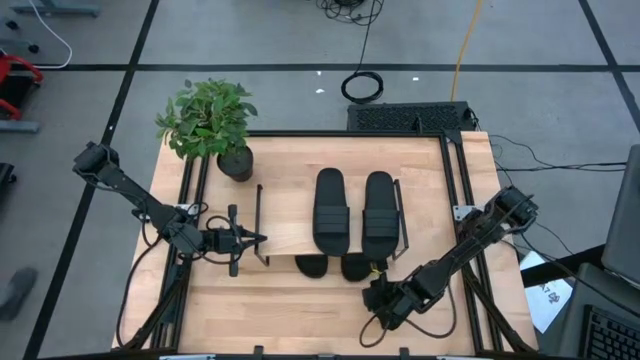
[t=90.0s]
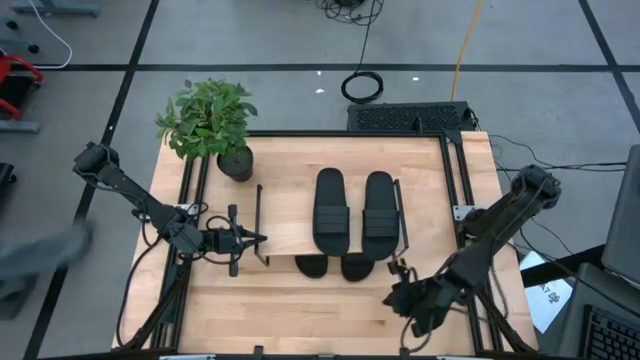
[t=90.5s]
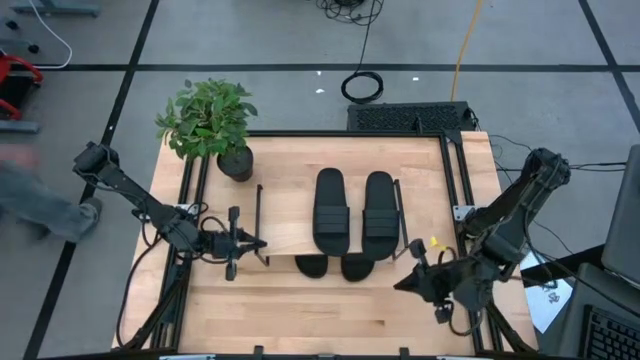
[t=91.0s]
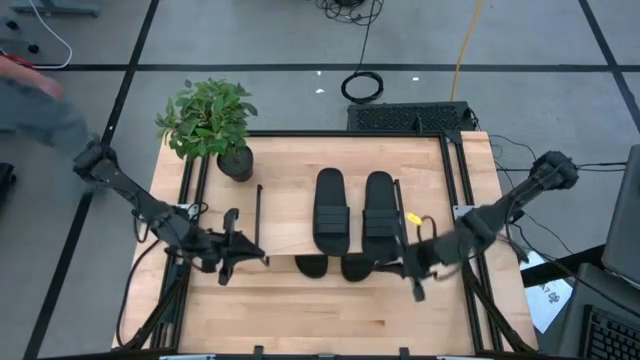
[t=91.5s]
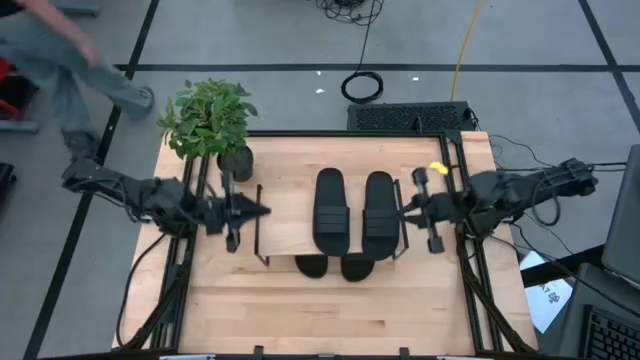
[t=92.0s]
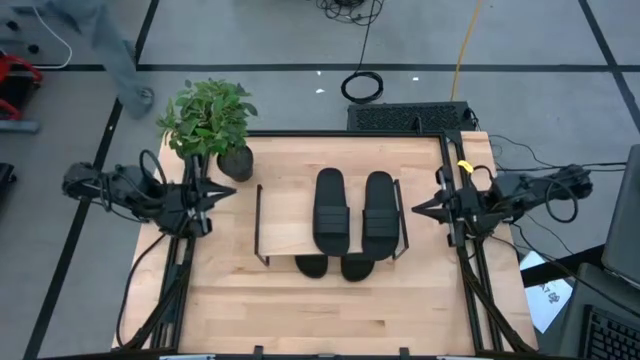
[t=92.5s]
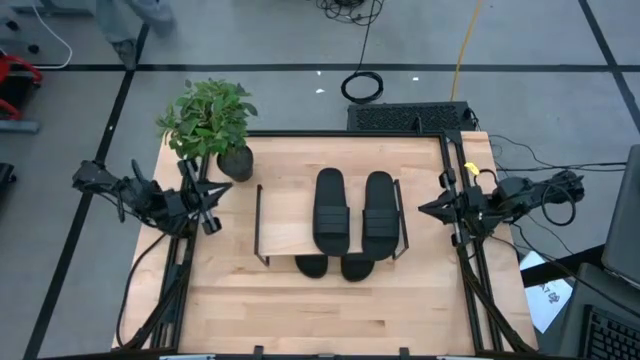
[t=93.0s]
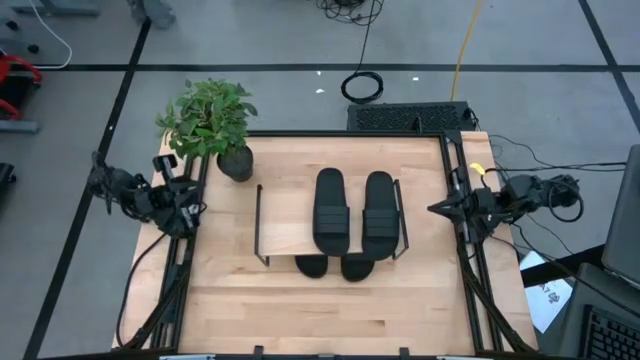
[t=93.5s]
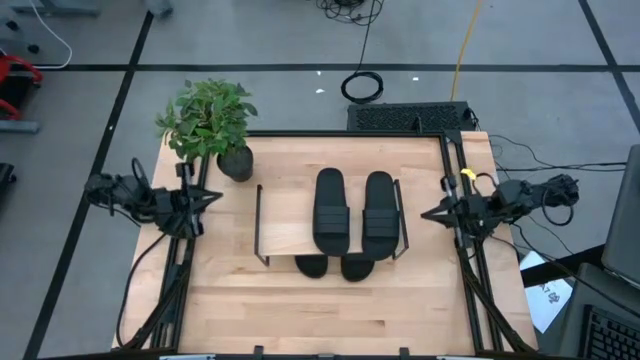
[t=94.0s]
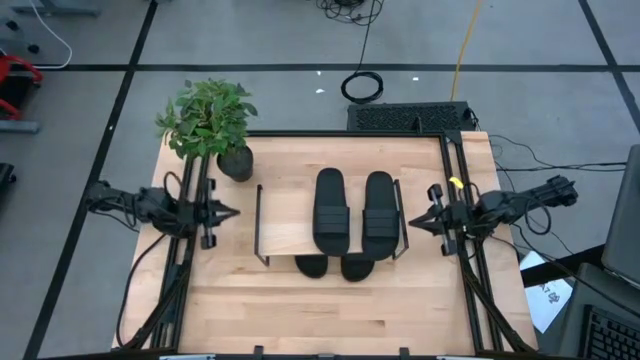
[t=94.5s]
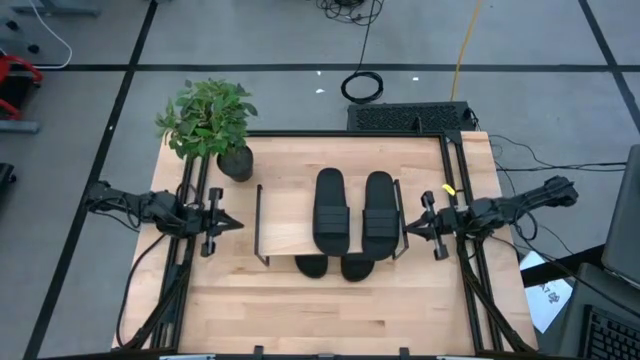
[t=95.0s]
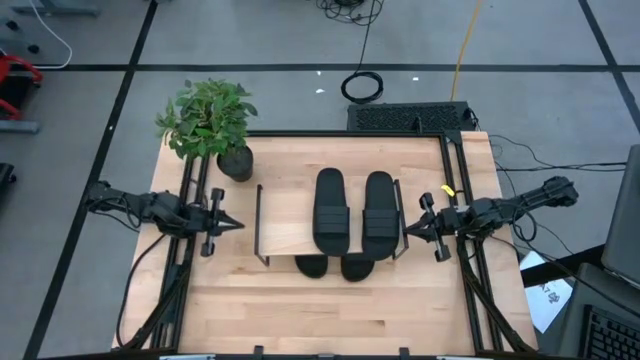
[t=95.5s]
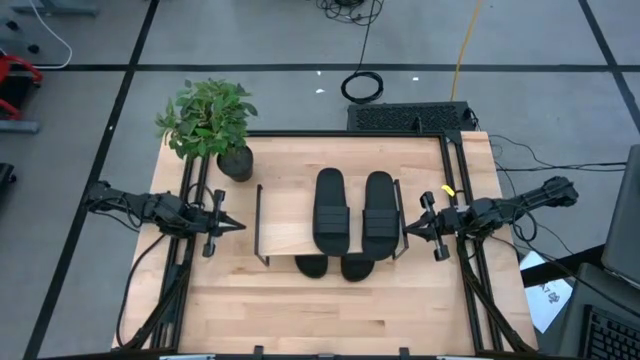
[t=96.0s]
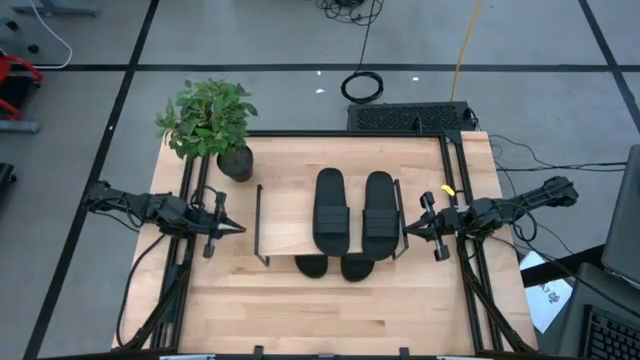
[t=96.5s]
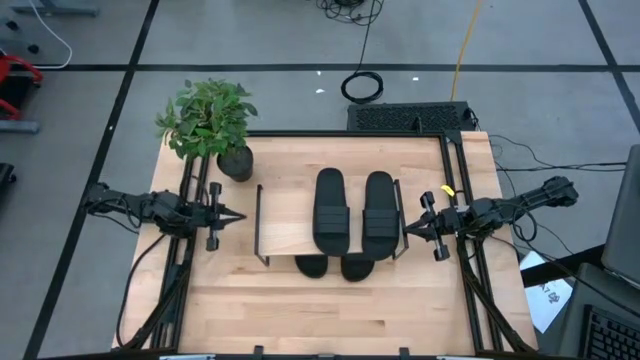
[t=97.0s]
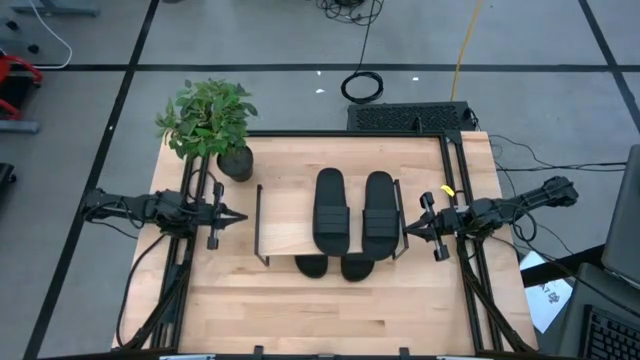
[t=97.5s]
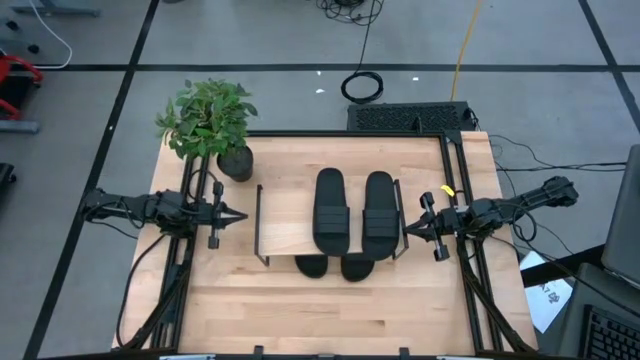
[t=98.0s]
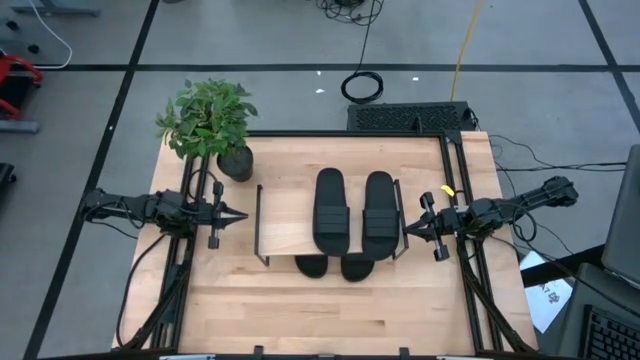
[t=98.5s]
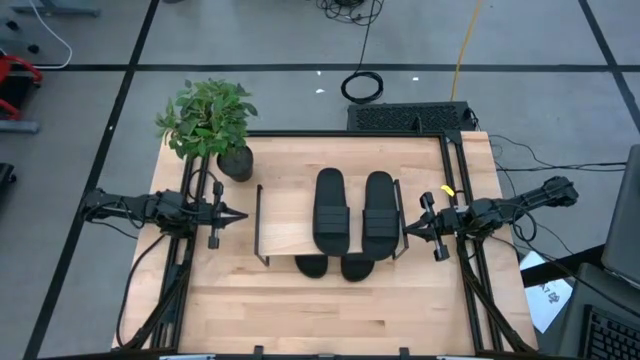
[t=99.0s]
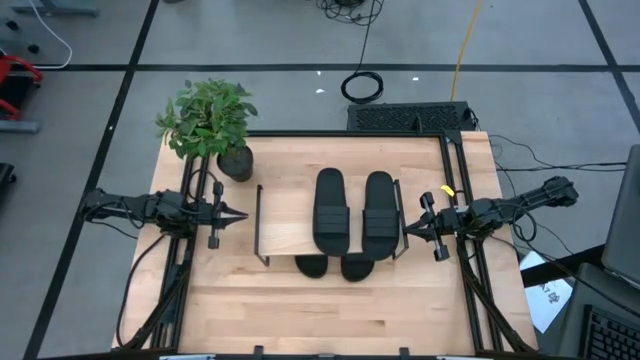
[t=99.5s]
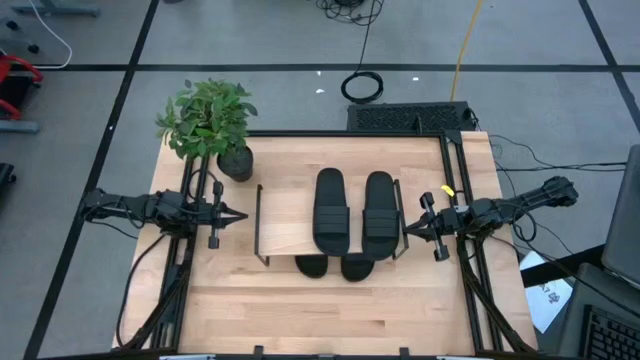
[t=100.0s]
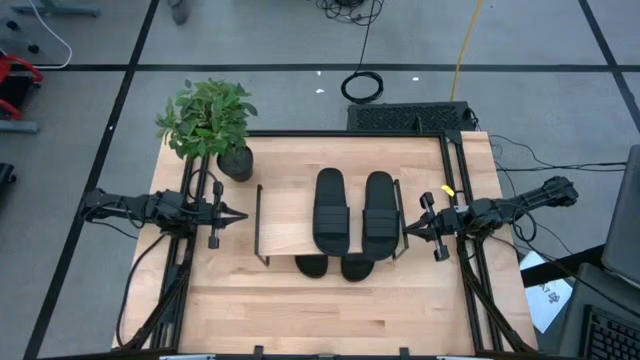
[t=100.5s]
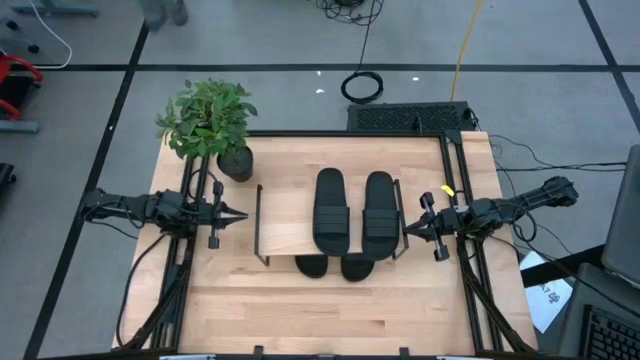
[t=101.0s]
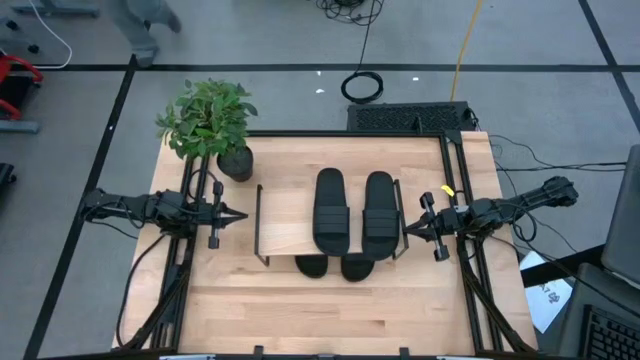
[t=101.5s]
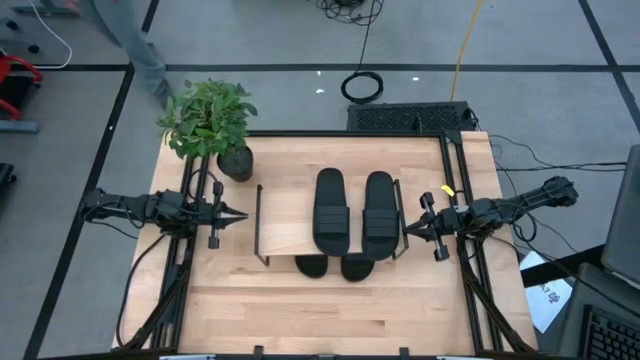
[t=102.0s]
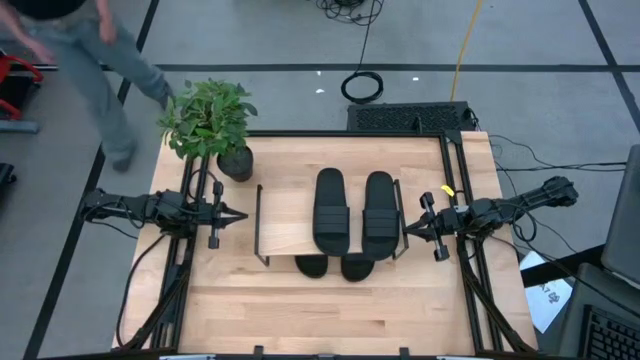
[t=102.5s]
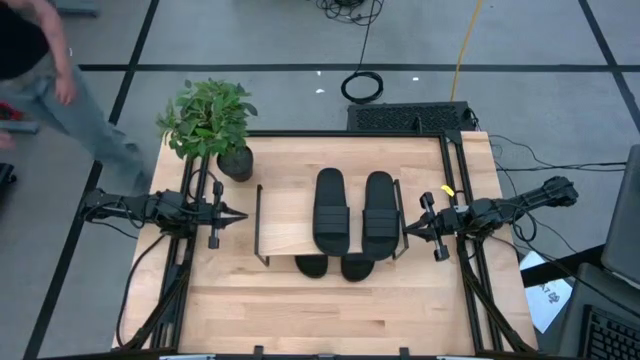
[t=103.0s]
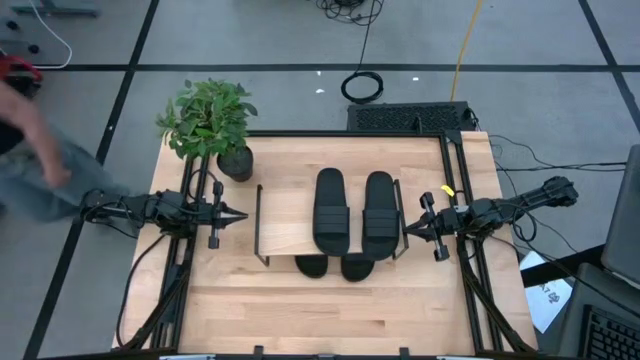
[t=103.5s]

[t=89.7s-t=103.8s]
Task: Pick and place slides into the shelf
Return to Home Position

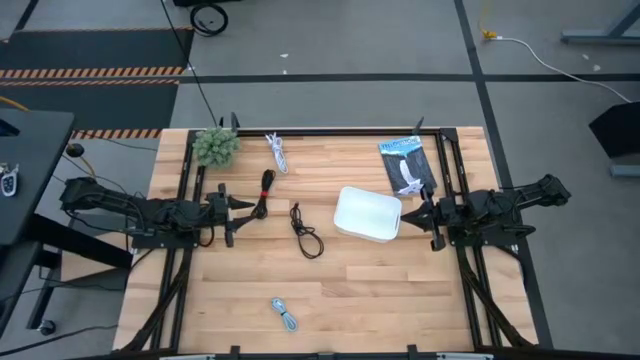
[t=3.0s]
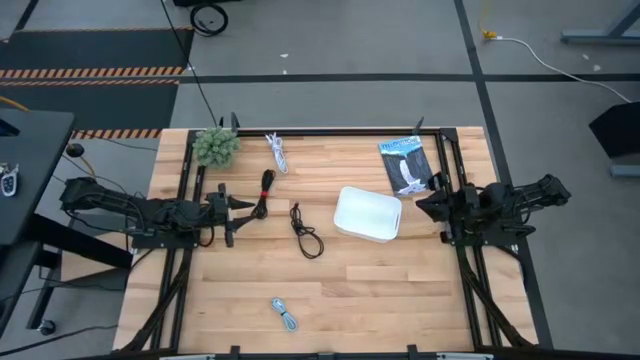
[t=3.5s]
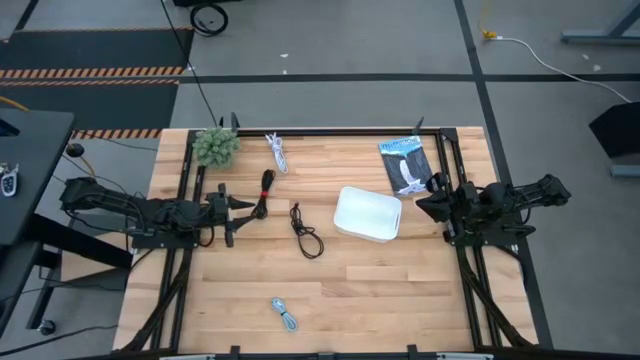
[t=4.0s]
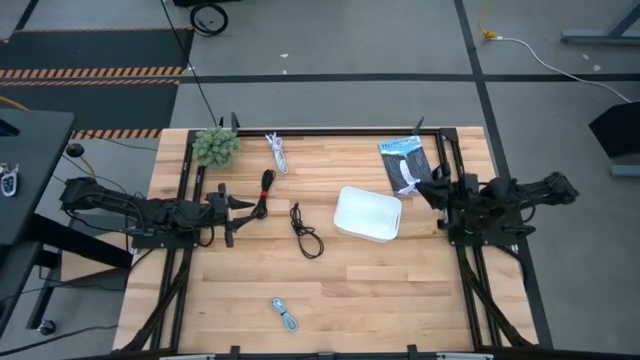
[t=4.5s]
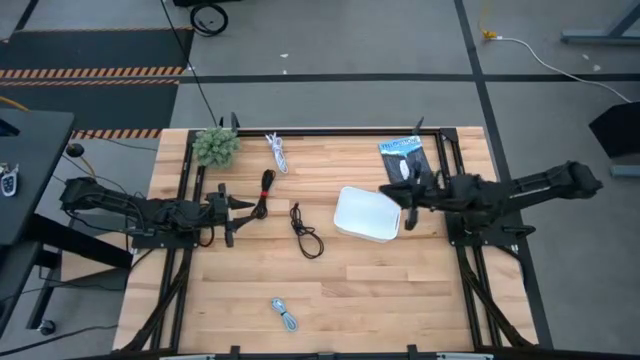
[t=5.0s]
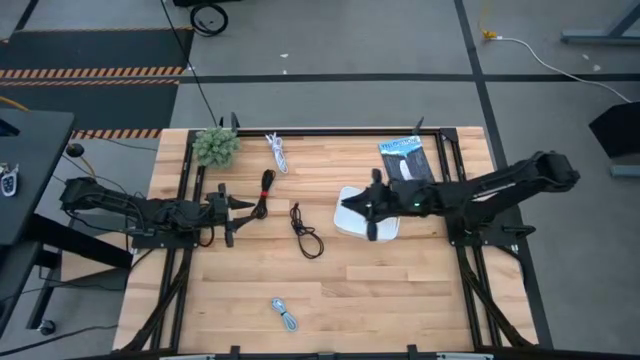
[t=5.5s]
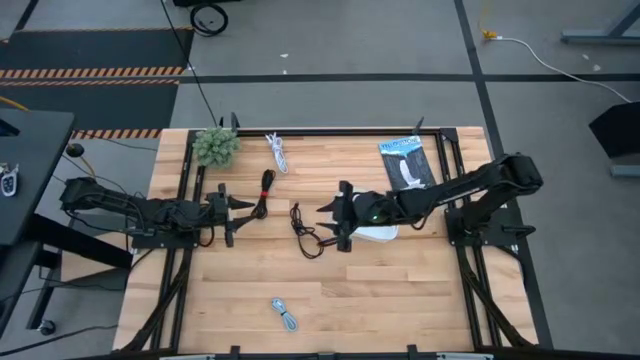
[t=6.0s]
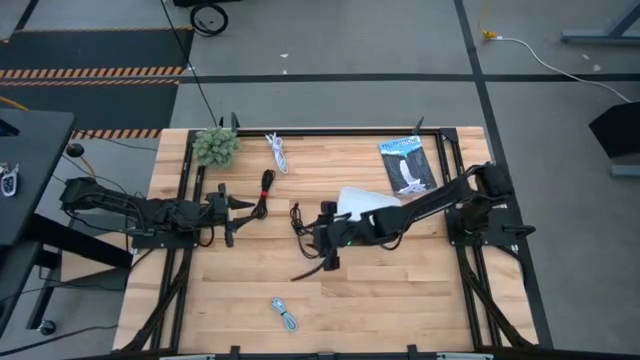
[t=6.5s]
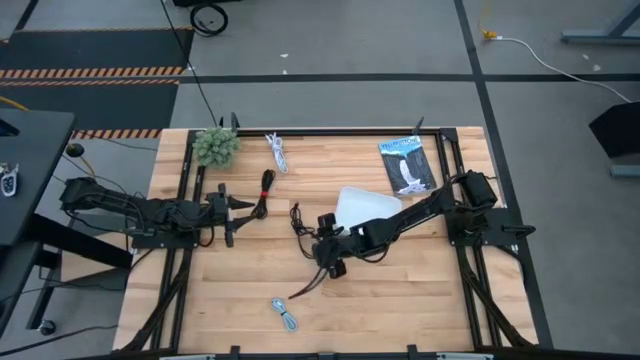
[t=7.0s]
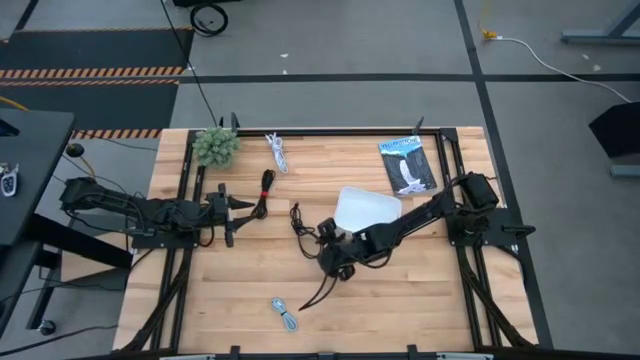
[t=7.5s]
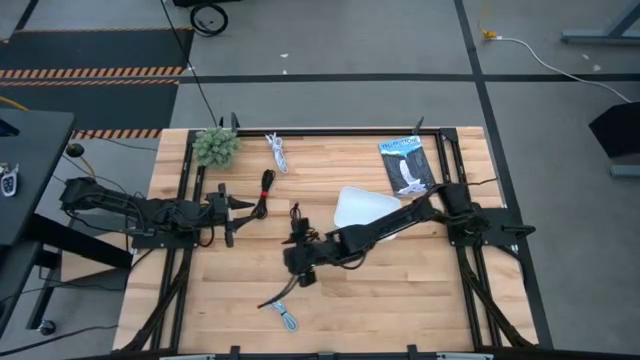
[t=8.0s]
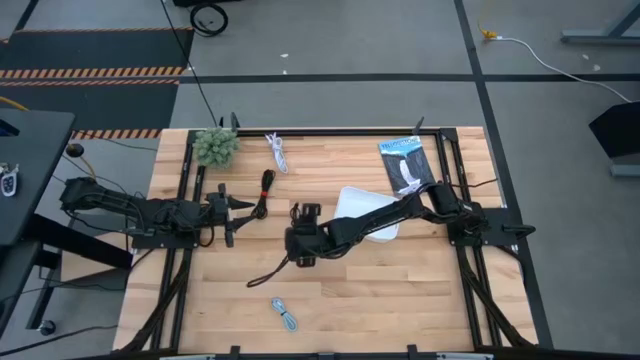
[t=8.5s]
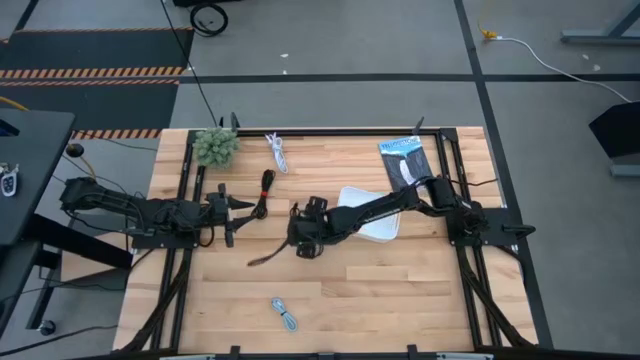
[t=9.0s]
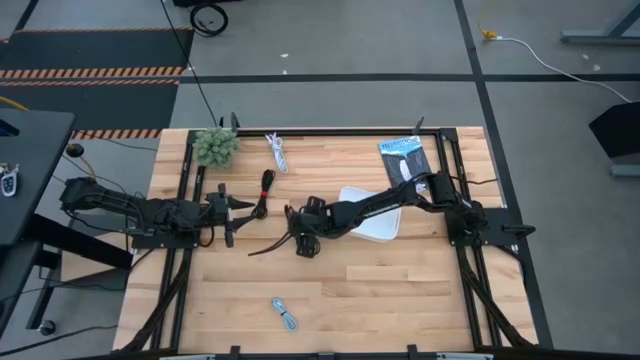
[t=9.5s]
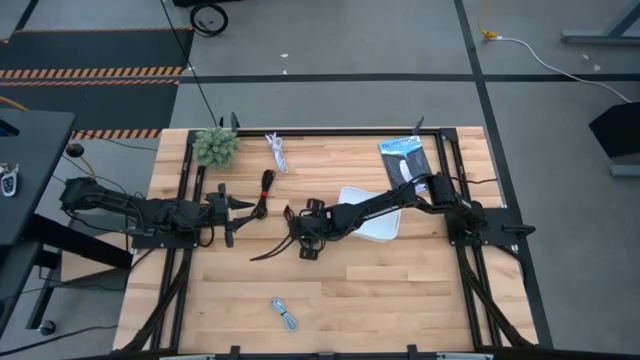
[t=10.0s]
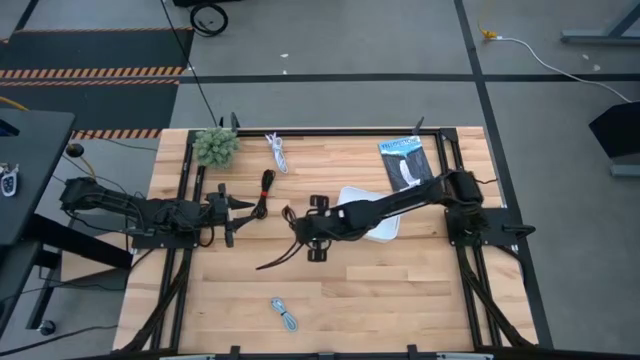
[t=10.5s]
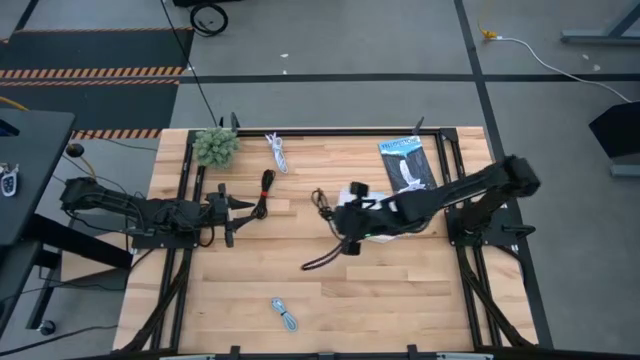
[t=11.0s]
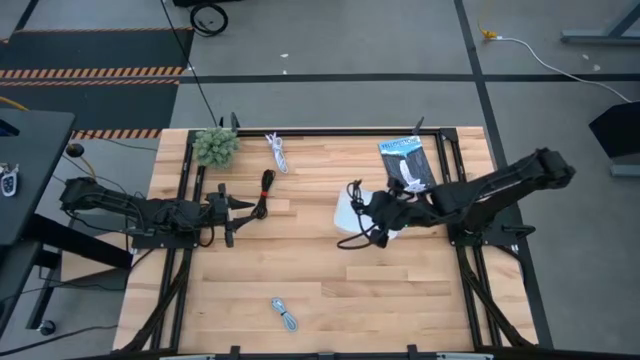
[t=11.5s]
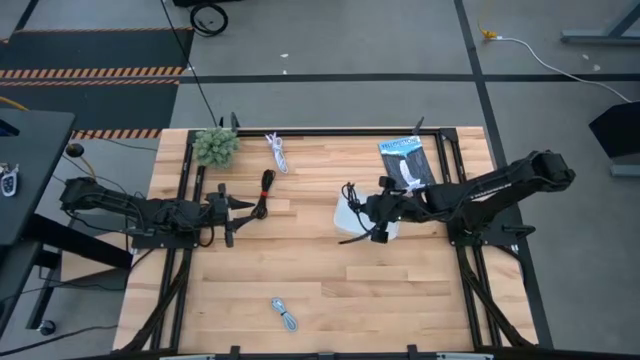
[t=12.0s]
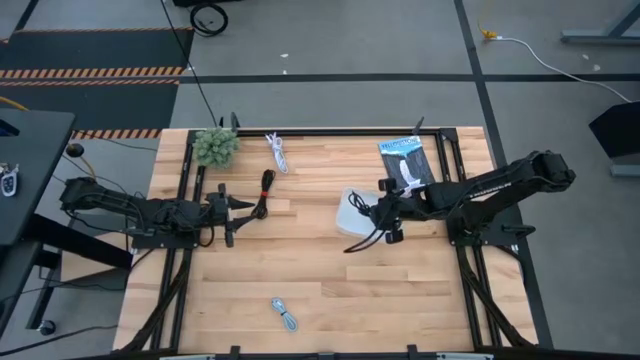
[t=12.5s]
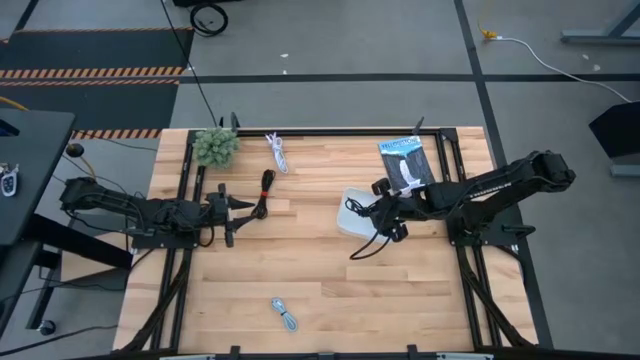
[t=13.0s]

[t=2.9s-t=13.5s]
Task: Pick and place USB-C Cables
Put the bottom black charger cable into the white bin
